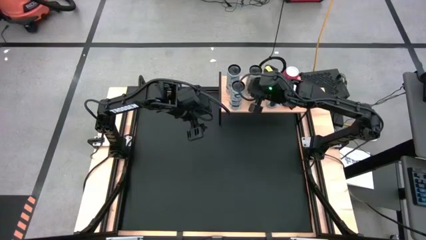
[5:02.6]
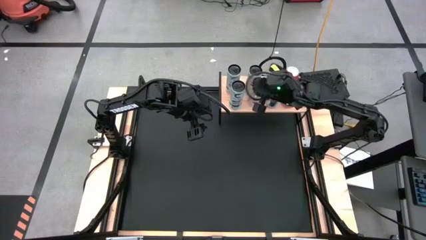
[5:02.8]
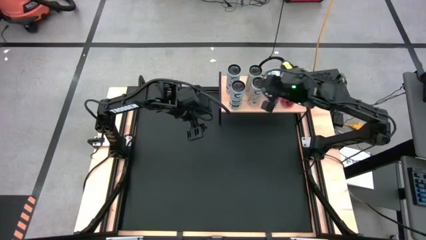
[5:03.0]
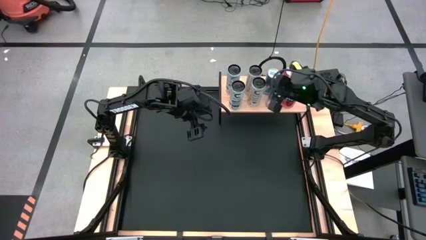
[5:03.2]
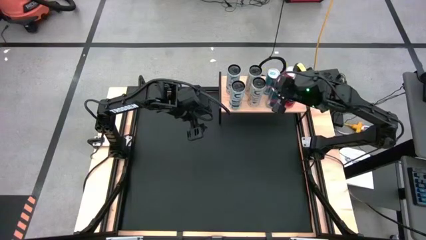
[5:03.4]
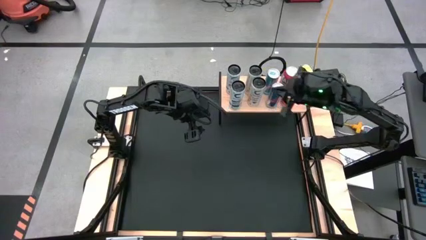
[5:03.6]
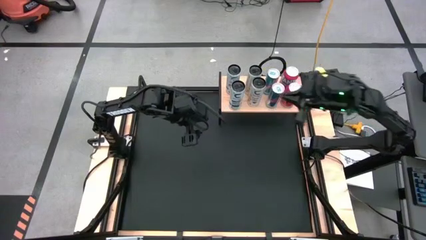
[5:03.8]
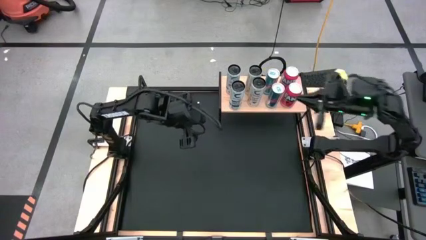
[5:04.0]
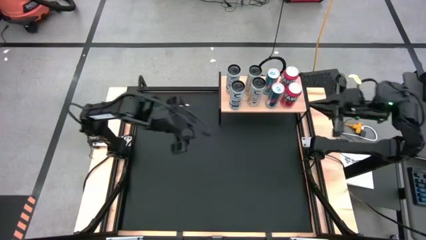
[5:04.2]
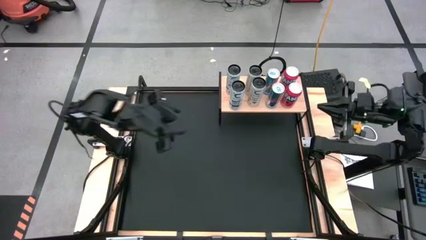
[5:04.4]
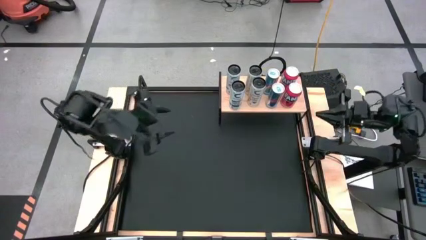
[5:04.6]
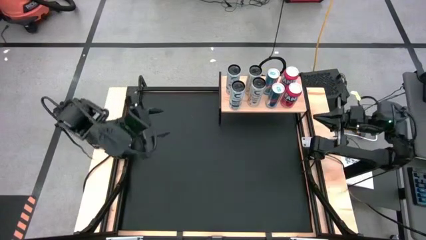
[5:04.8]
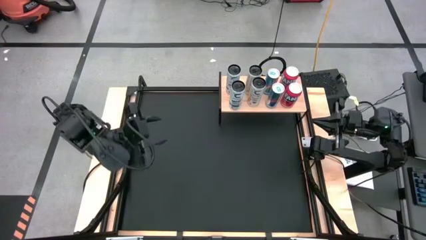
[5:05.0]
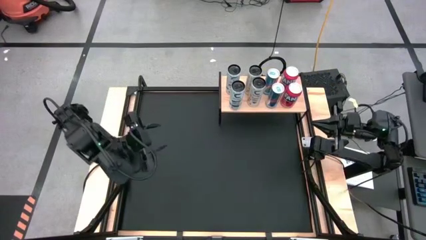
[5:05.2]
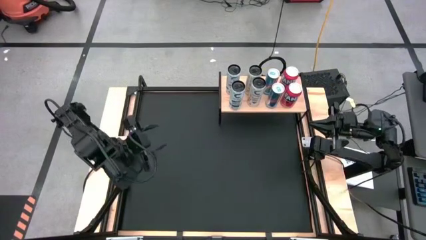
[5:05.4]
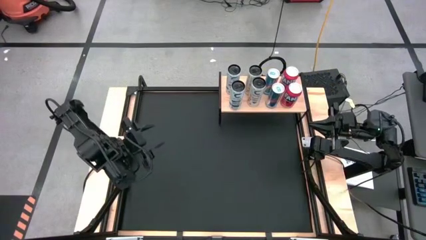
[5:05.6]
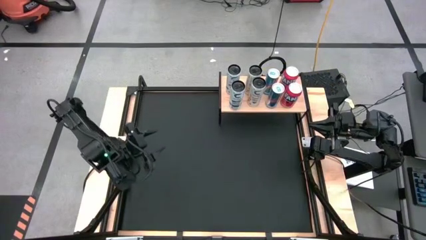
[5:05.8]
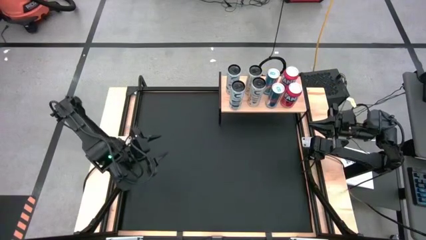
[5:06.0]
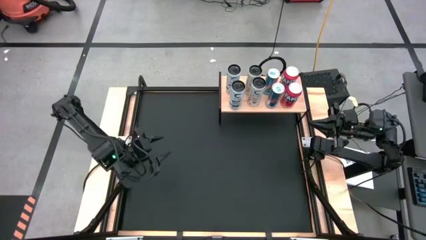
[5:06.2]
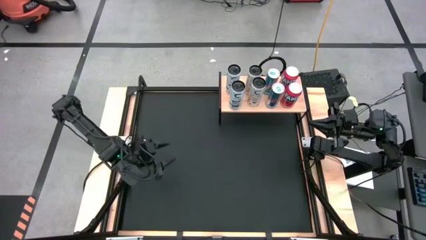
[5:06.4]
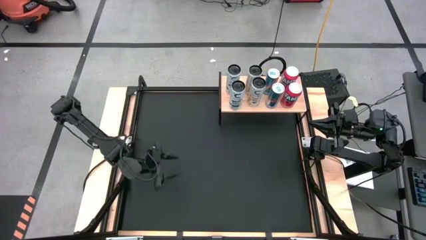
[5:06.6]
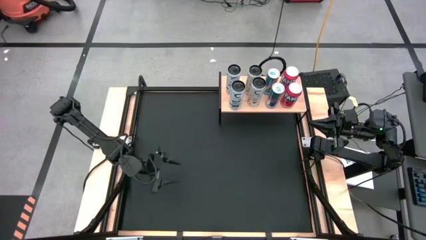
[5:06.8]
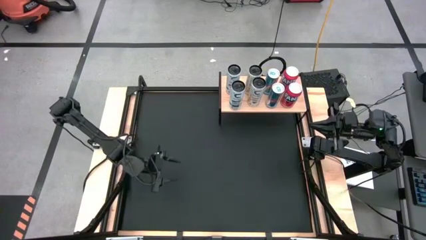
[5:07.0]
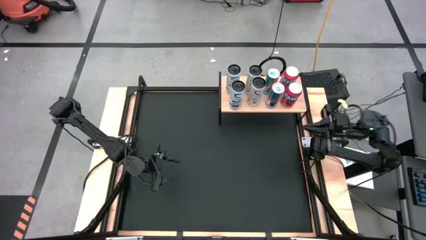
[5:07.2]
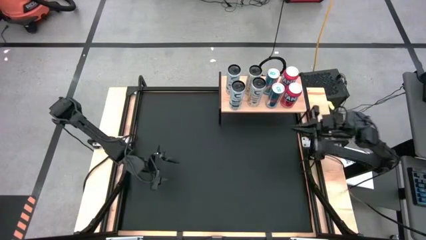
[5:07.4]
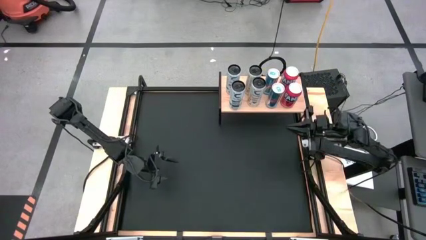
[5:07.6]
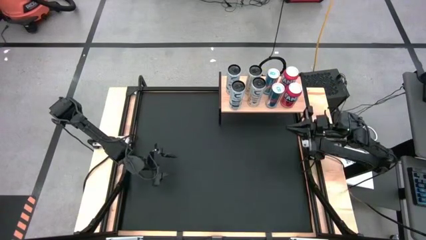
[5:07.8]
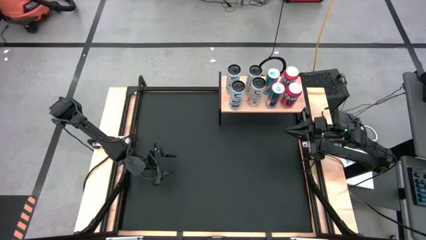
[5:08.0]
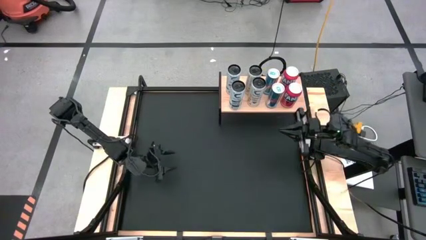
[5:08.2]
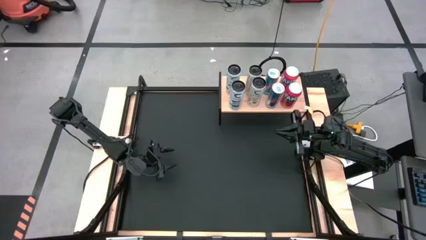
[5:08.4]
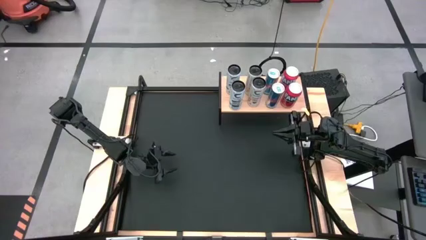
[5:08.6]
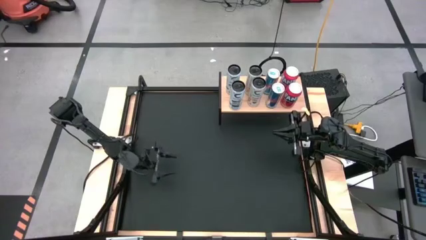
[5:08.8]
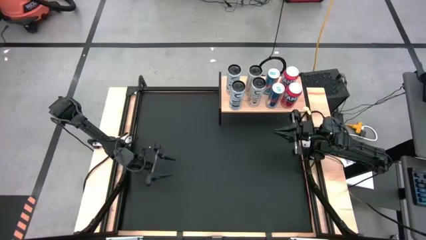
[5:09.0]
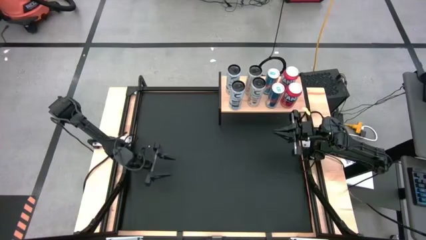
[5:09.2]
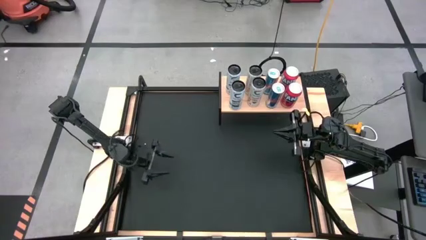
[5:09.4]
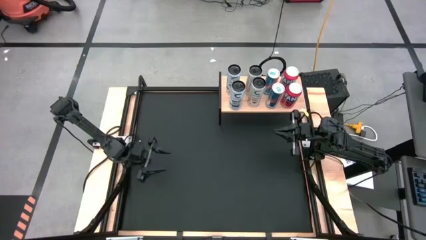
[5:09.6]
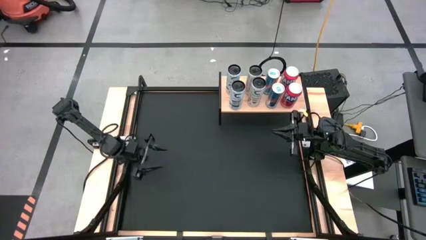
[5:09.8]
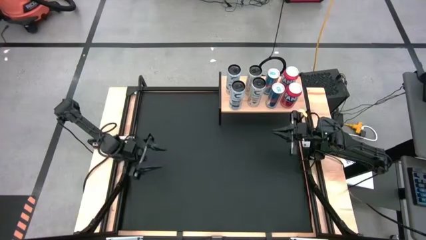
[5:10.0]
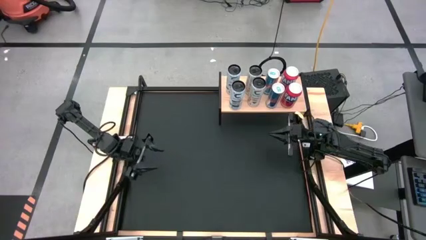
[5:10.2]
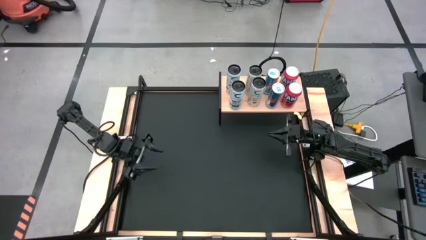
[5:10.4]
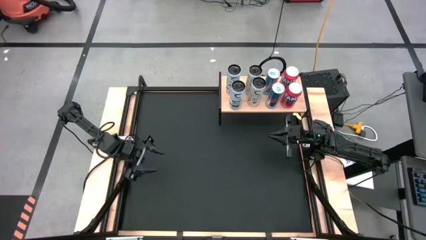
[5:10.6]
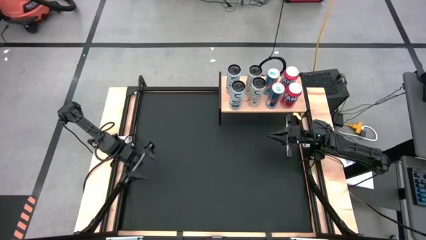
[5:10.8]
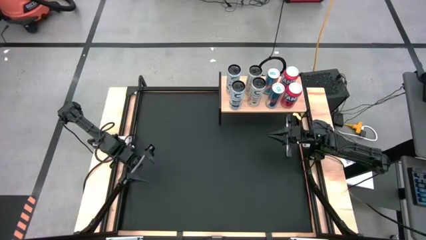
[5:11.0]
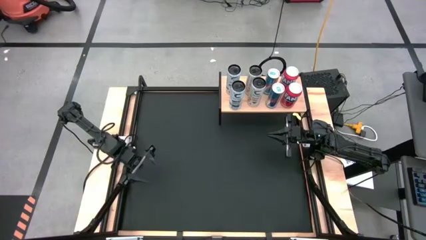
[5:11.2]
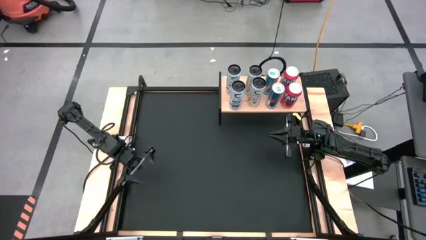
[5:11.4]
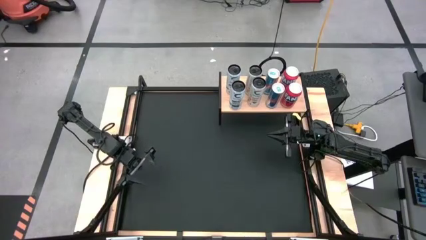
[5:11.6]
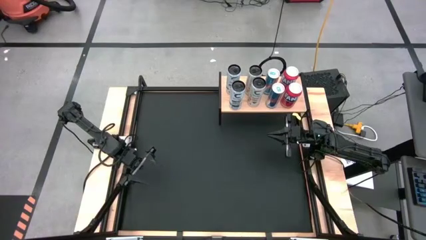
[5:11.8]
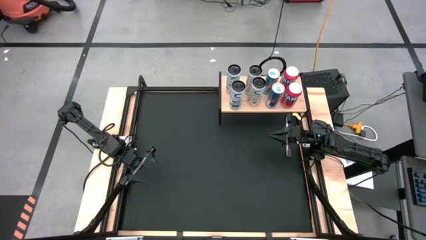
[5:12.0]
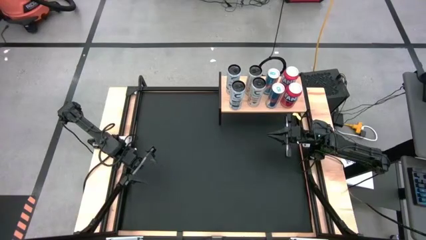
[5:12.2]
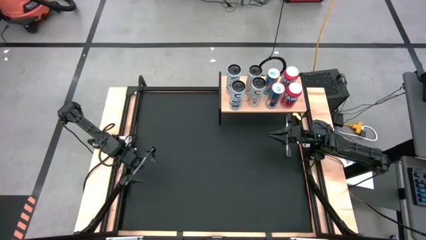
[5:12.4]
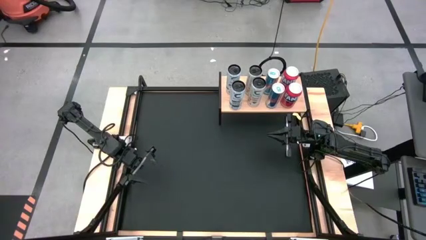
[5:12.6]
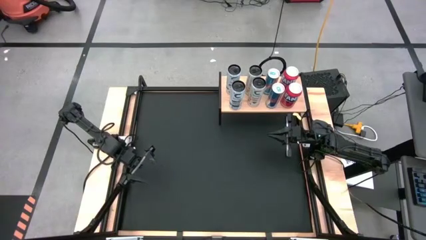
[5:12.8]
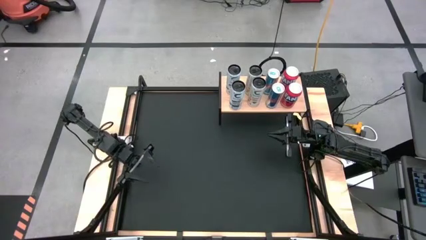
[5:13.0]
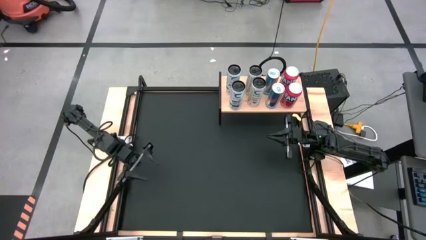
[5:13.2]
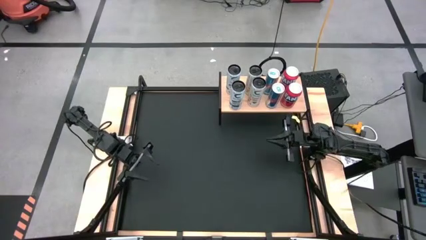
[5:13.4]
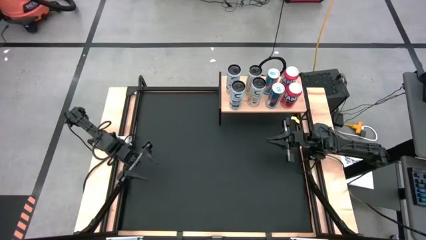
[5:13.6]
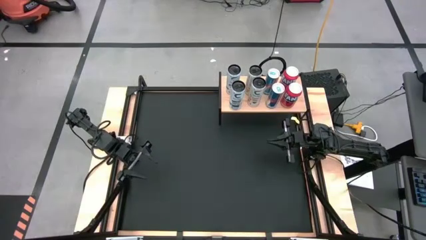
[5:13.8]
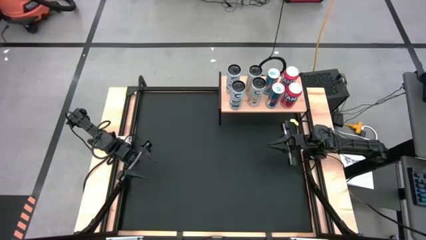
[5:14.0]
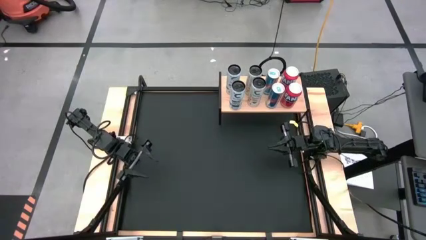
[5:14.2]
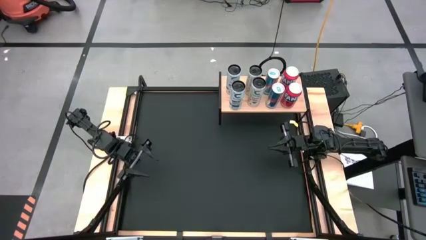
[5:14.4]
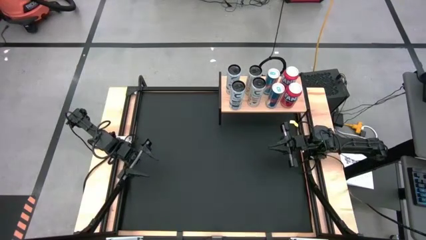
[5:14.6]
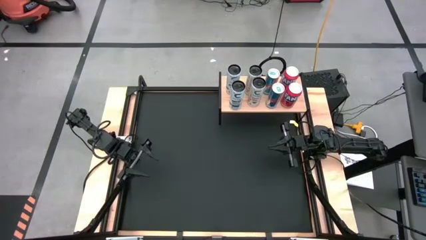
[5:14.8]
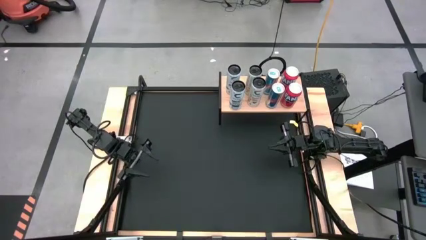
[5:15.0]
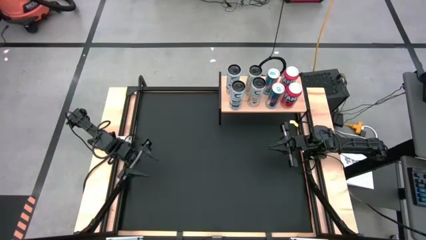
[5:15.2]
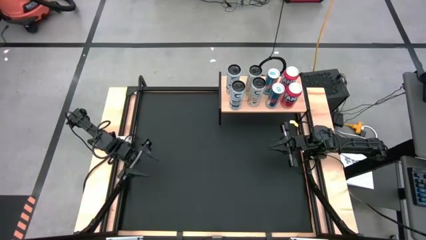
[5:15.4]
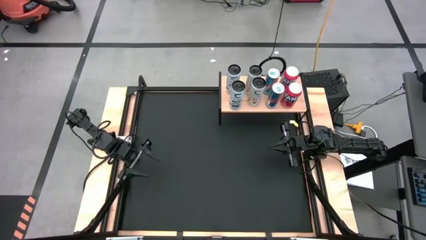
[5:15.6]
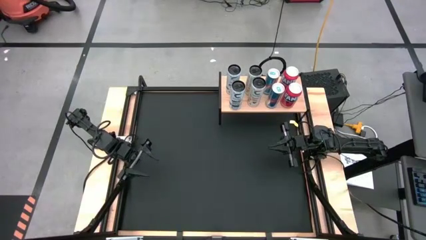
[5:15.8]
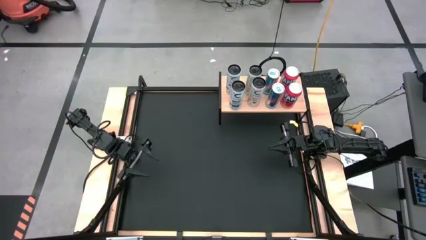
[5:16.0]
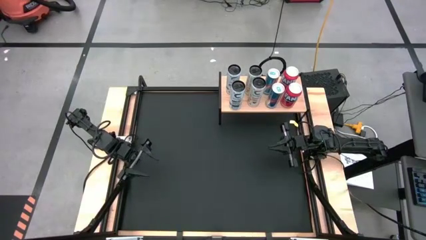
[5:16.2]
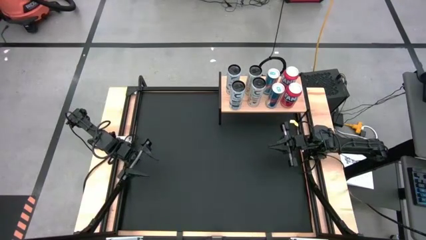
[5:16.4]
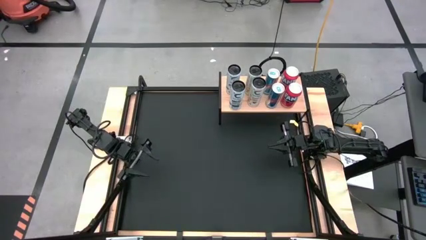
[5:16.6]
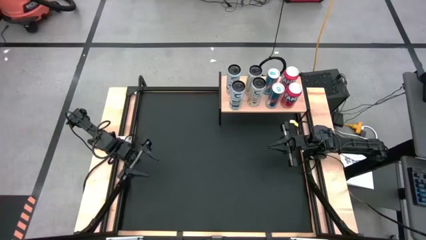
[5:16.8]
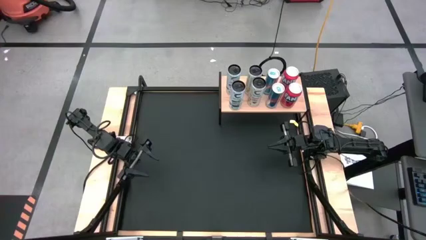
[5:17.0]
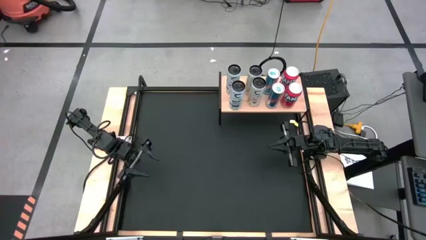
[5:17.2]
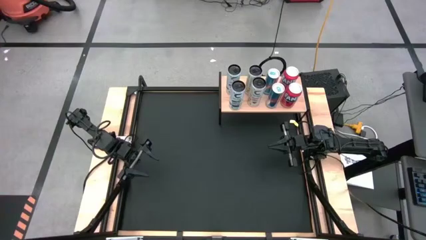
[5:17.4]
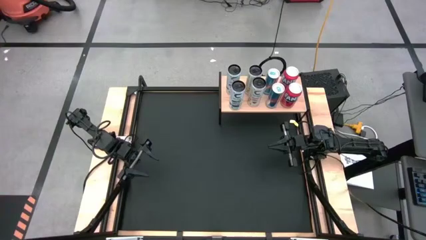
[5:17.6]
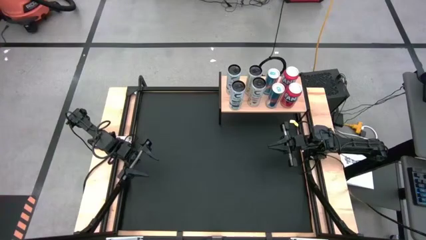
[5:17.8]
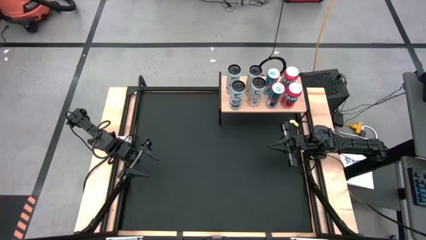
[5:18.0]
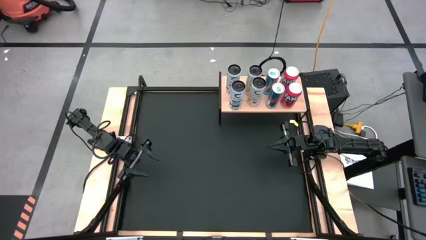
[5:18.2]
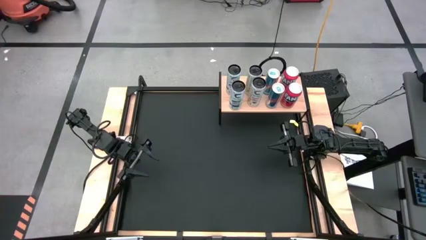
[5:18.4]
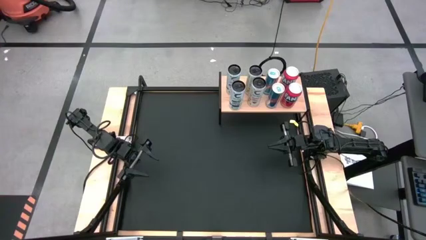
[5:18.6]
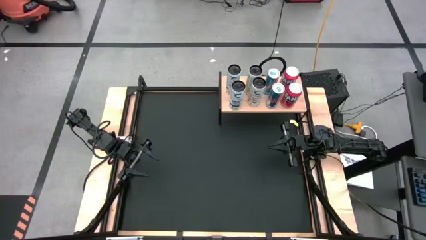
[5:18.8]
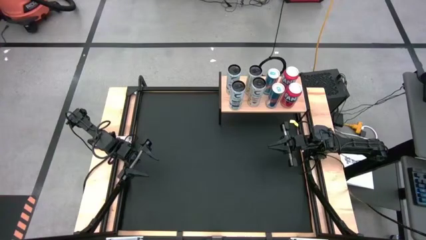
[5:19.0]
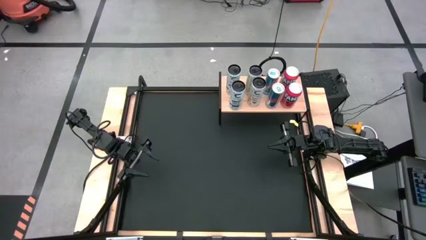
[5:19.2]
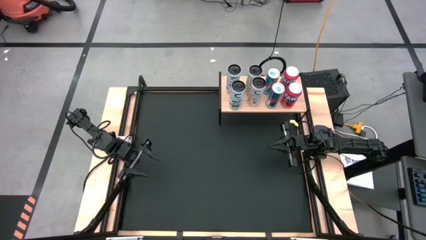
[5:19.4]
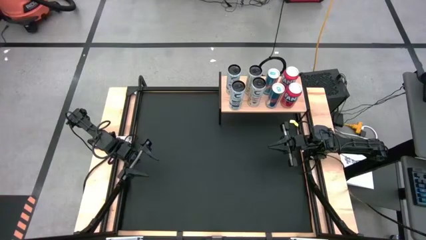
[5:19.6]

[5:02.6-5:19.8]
Task: Place canned beverage on shelf
Return to Home Position
